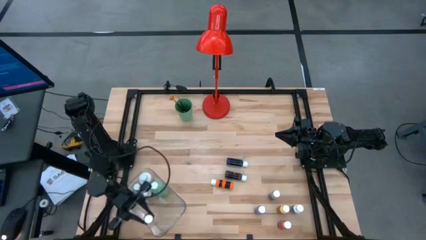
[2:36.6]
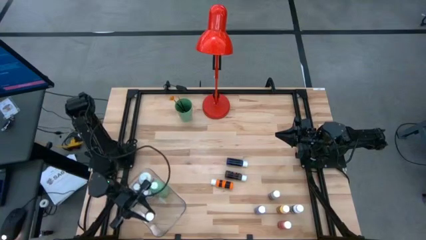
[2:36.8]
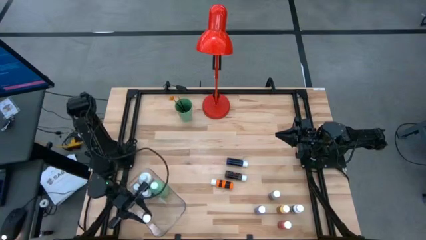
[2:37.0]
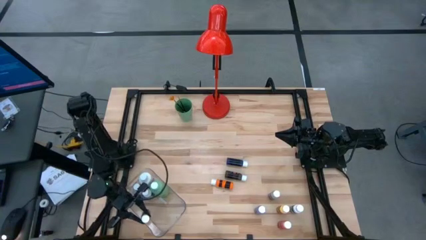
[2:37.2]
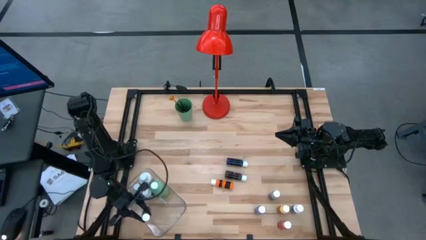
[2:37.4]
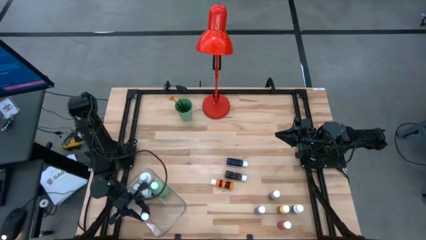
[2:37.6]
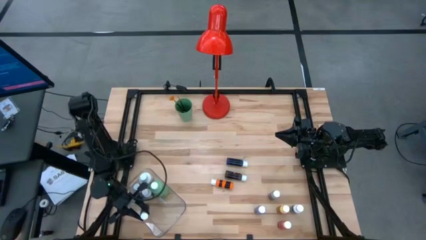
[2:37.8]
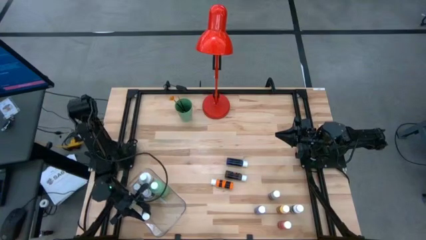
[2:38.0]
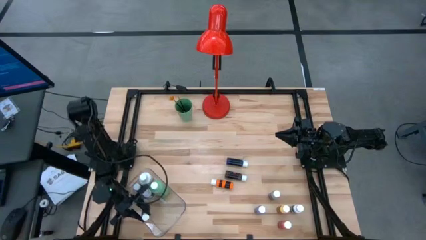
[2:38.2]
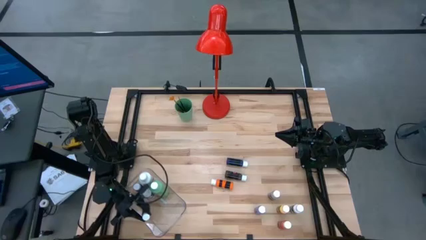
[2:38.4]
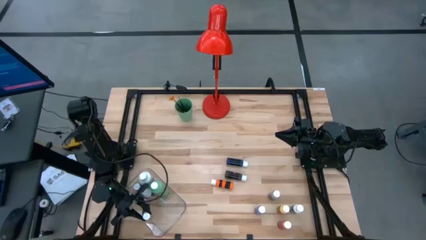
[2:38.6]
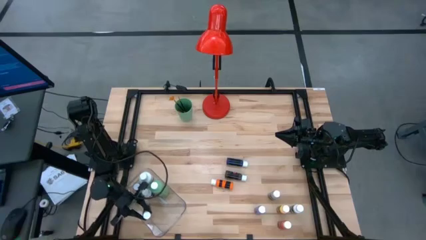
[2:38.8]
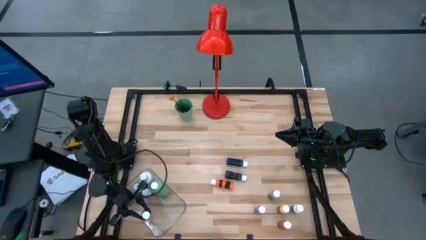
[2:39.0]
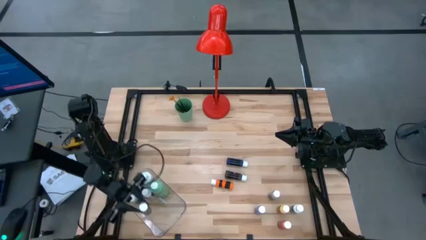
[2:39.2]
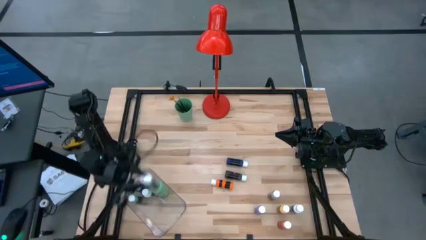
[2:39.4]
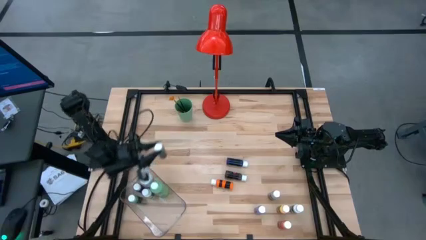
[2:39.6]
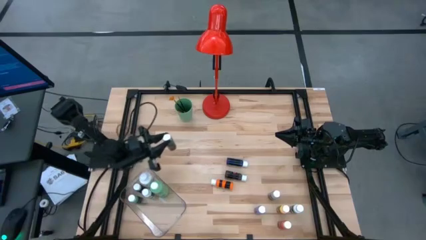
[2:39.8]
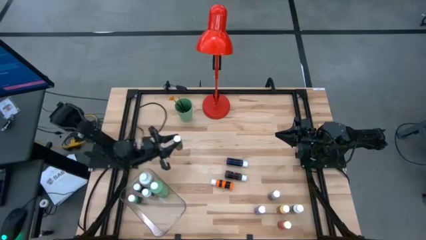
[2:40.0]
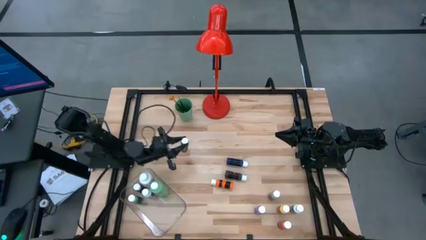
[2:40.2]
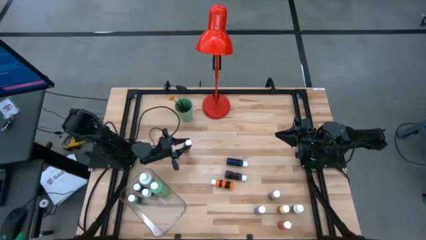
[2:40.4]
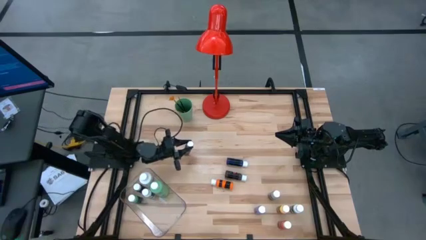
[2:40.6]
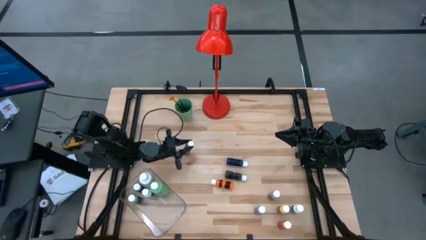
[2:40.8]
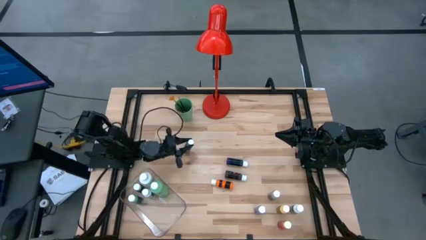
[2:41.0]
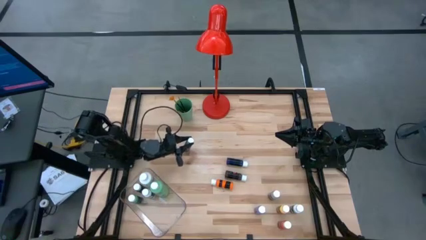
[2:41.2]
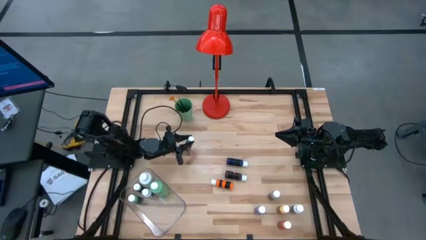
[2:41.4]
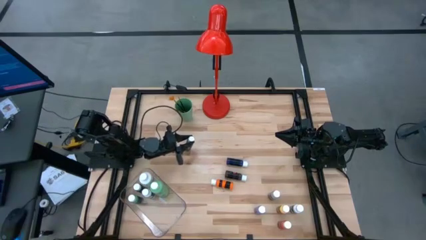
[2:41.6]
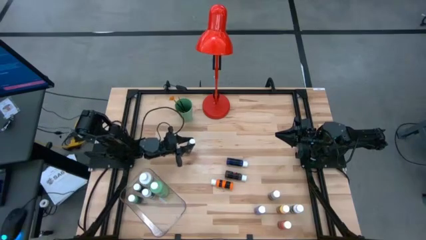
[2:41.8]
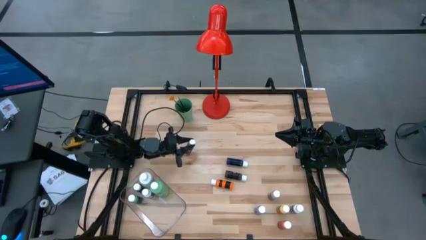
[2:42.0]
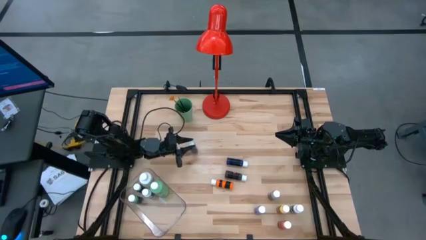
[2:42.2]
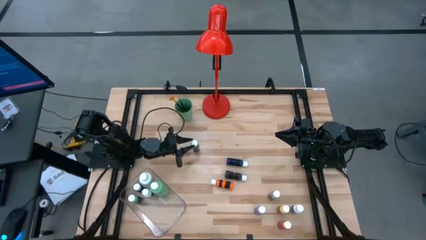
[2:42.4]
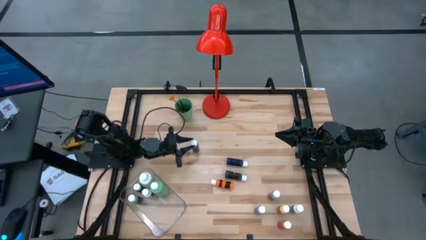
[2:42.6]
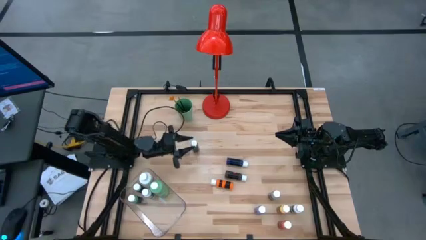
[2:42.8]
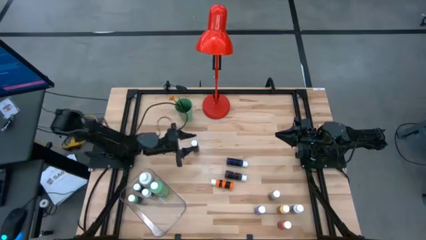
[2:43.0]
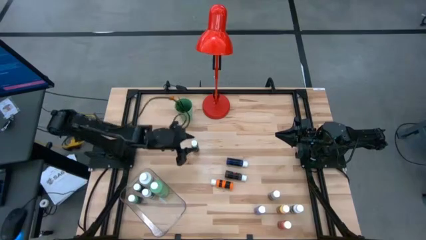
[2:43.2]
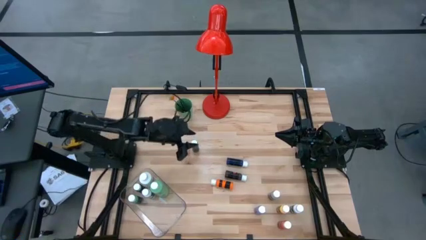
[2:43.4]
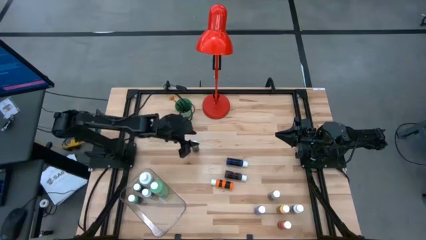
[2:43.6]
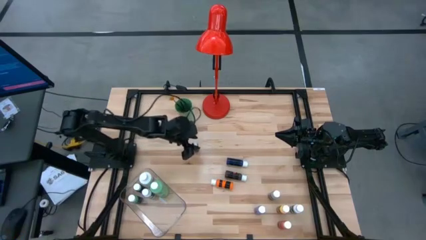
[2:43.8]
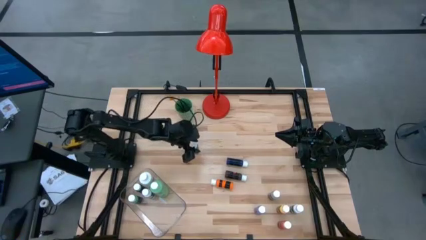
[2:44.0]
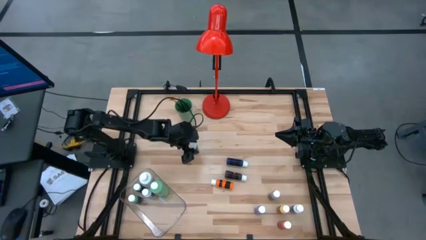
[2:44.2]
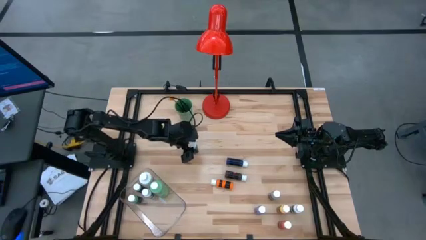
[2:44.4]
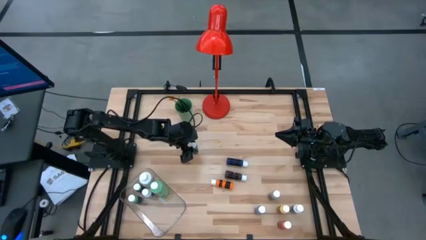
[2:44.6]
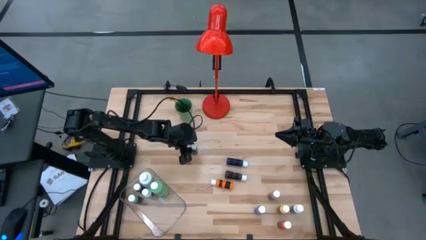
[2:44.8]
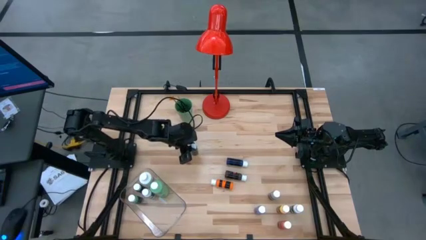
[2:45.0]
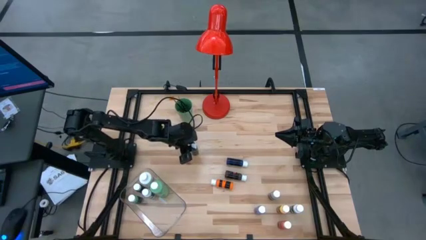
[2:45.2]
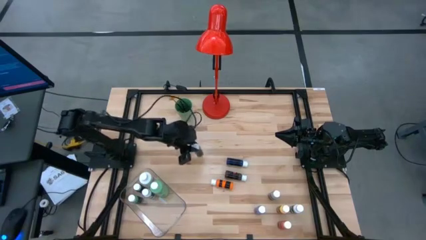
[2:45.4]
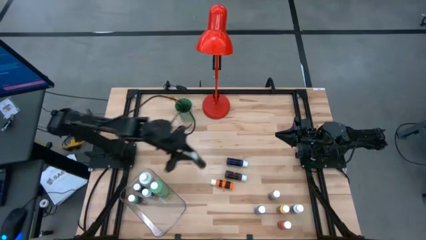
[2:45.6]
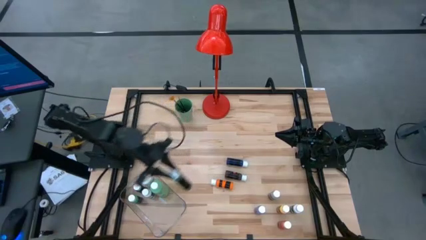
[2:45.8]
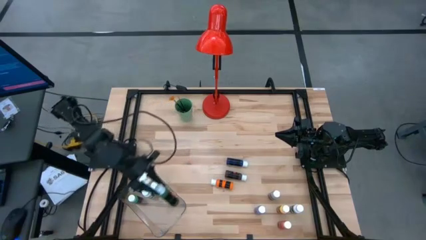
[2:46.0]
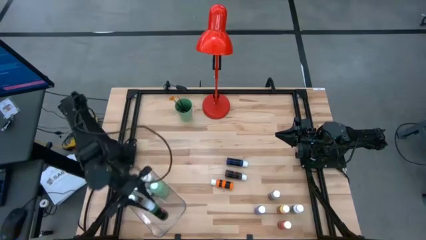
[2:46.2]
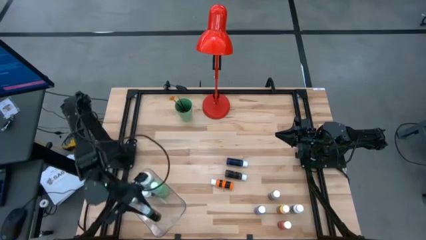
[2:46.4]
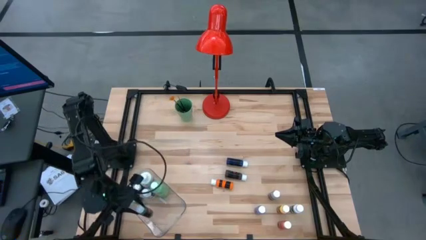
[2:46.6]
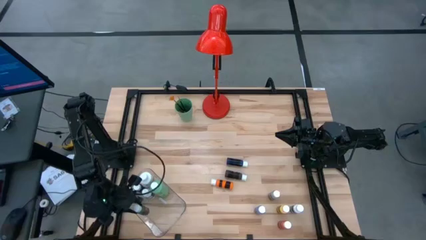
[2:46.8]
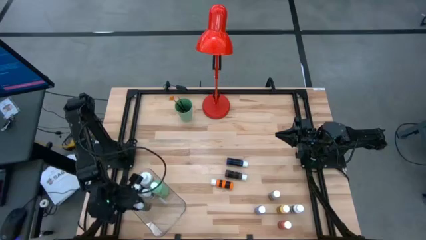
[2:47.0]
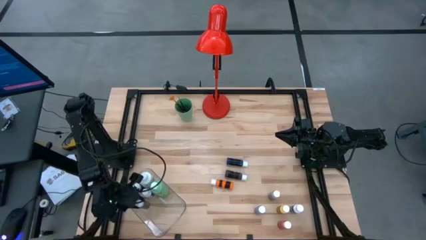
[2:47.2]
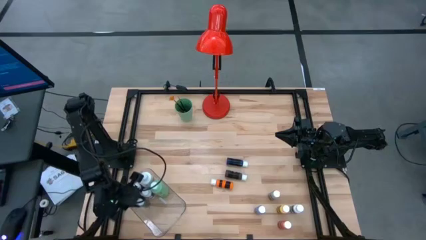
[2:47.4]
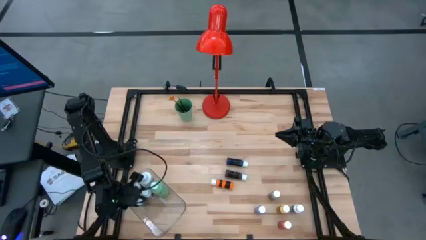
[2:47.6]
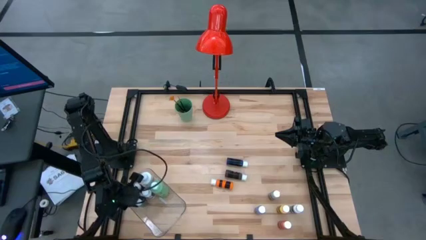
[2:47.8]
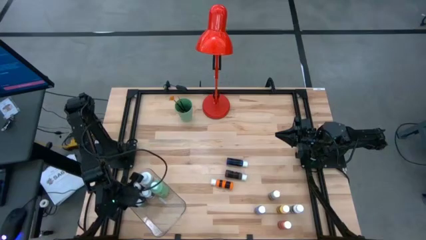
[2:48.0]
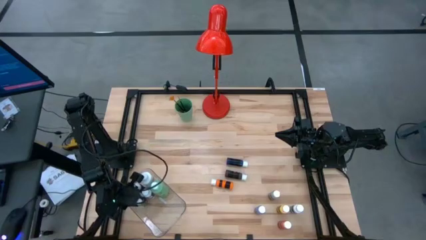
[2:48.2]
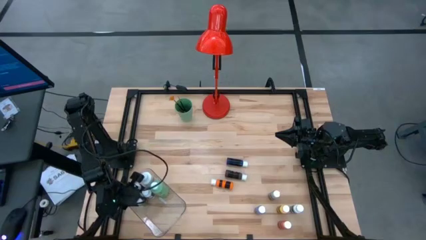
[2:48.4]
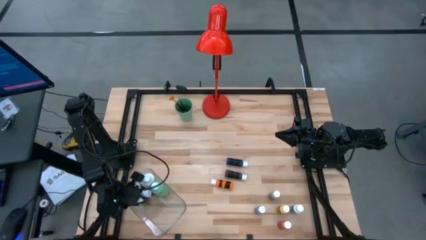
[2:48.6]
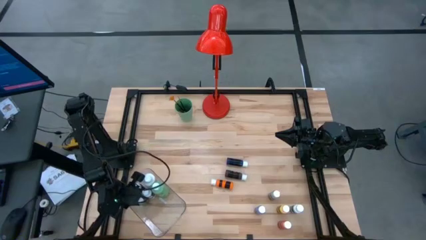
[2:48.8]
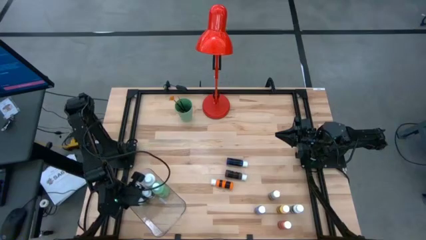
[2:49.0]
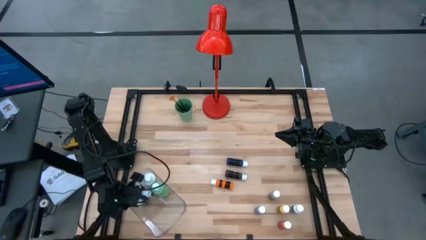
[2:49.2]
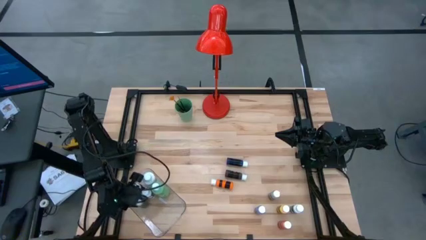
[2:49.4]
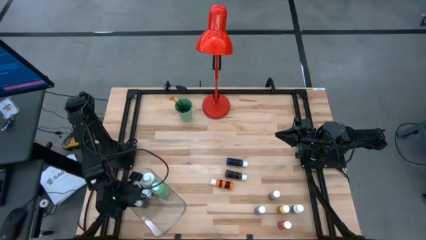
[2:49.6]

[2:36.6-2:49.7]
Task: Pick & Place Paint Supplies
Put the green coloring bottle into the transparent bin

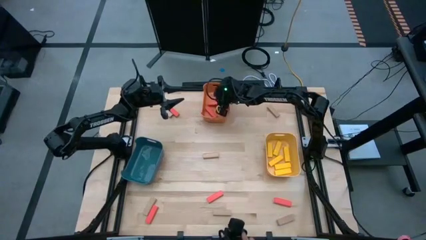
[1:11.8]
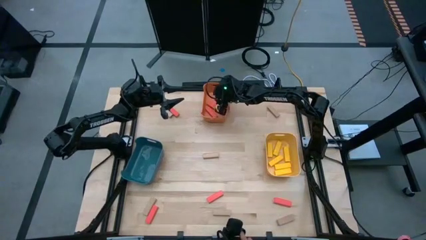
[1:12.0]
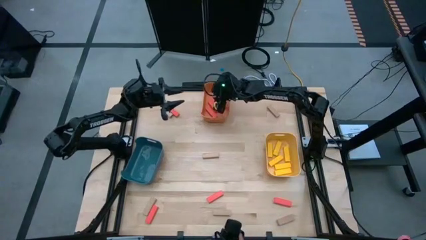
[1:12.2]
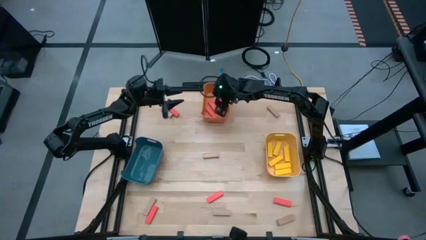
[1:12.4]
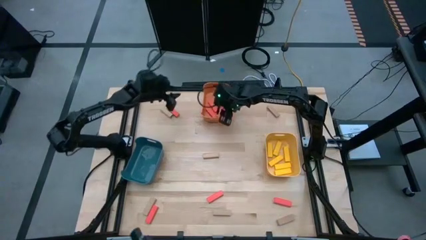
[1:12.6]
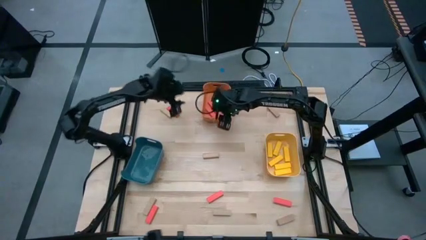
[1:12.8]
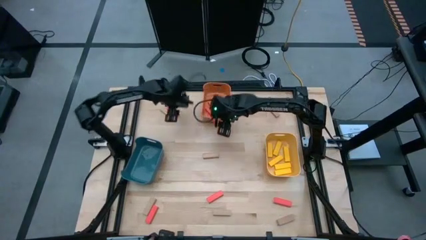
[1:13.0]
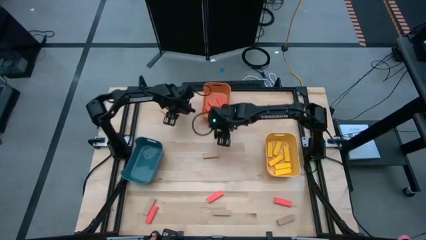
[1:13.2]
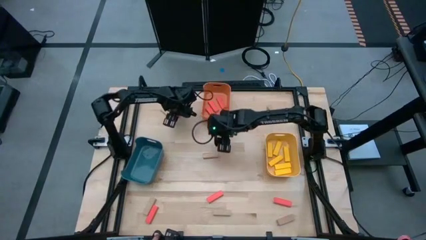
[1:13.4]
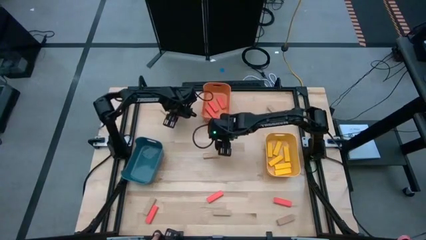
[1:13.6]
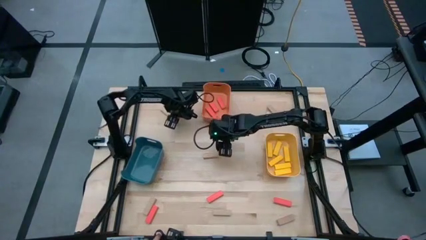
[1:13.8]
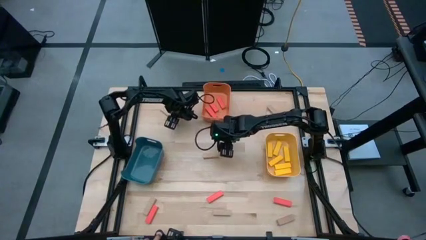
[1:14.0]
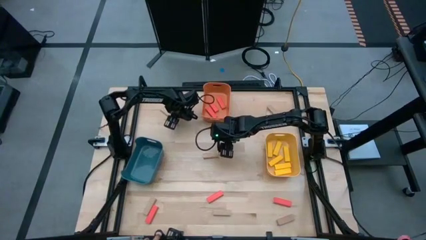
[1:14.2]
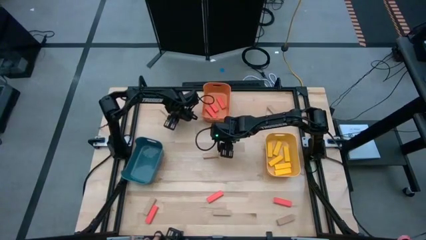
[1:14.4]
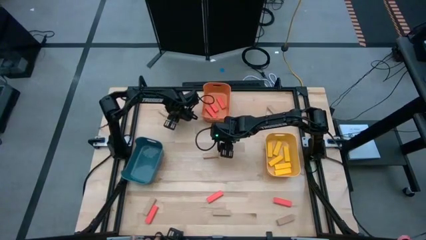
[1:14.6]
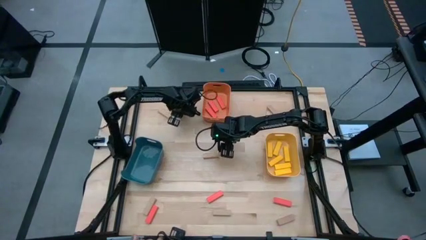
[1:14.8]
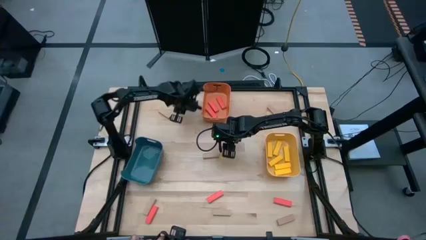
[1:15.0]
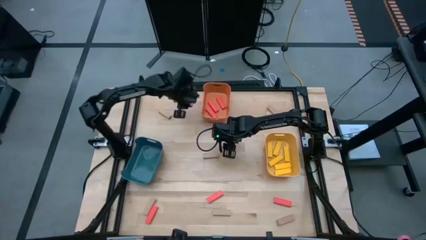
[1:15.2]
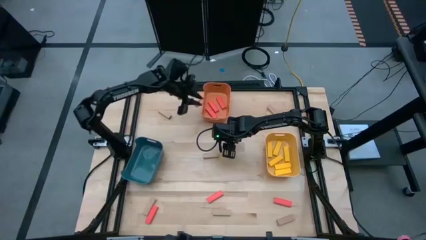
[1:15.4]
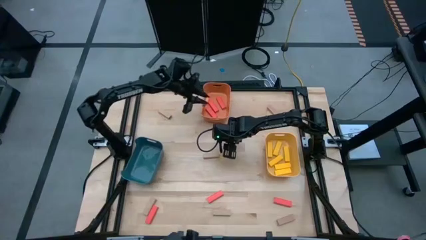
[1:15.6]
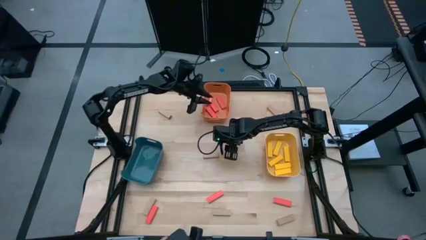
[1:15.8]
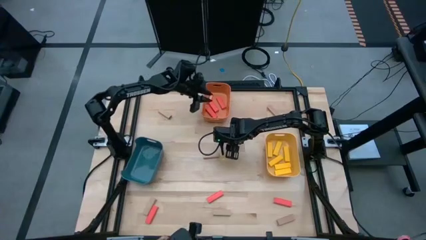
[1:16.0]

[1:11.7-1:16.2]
Task: Sort blocks
Put the top orange block into the orange bin
